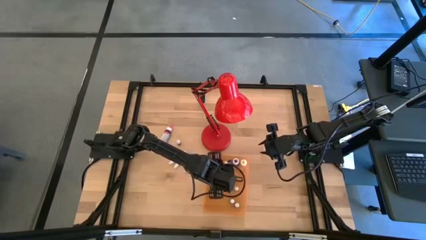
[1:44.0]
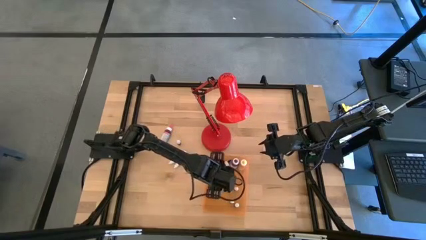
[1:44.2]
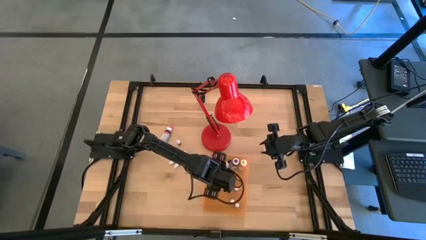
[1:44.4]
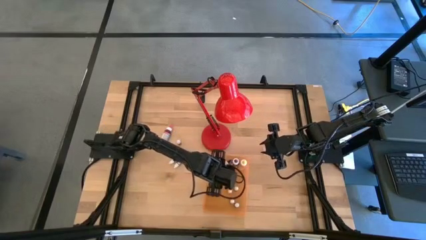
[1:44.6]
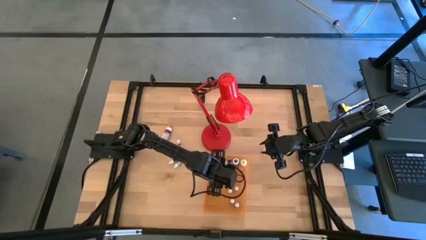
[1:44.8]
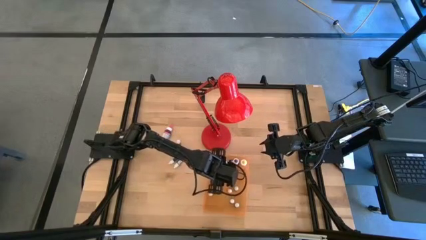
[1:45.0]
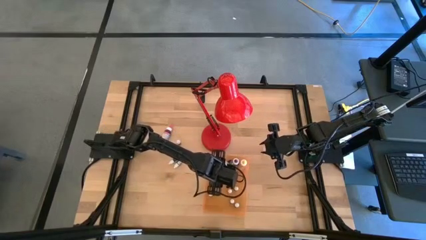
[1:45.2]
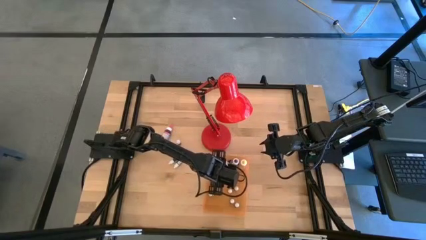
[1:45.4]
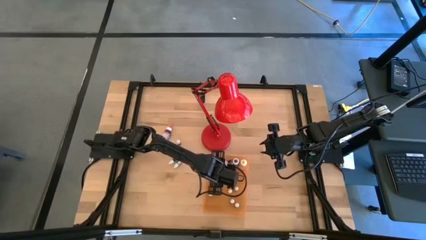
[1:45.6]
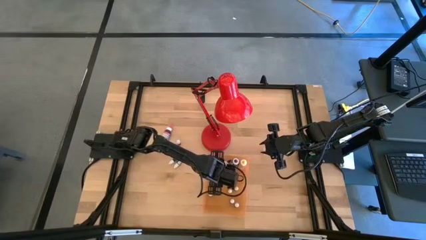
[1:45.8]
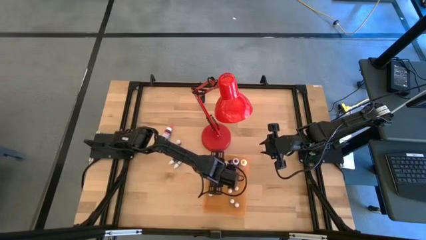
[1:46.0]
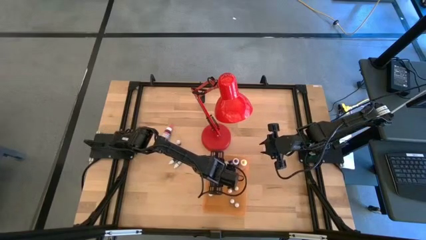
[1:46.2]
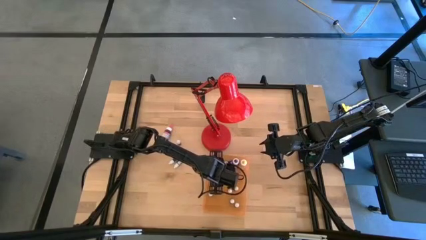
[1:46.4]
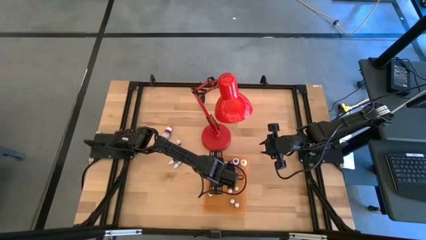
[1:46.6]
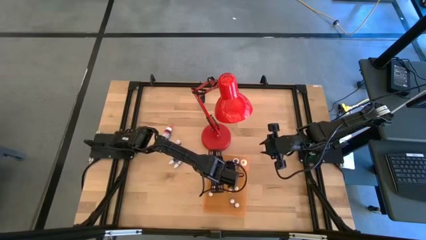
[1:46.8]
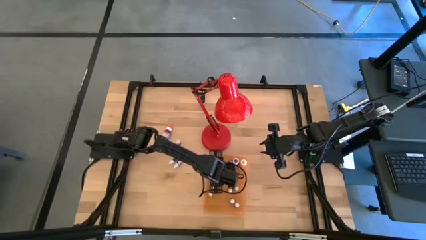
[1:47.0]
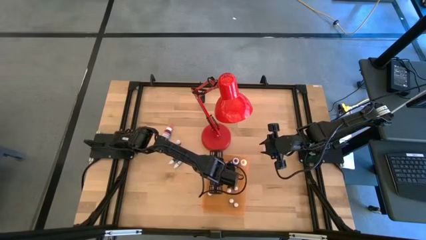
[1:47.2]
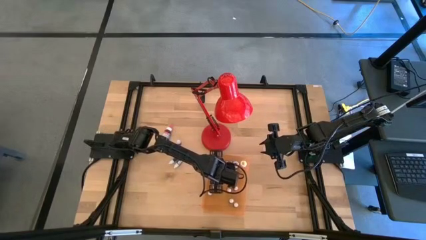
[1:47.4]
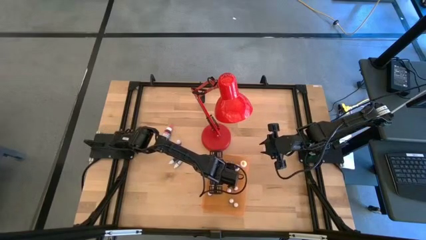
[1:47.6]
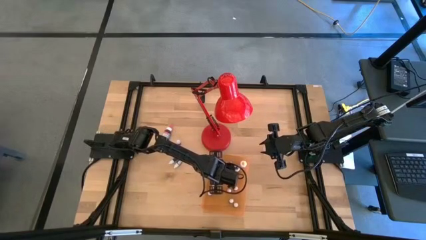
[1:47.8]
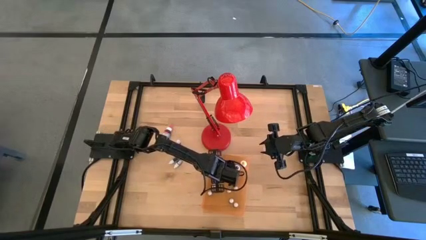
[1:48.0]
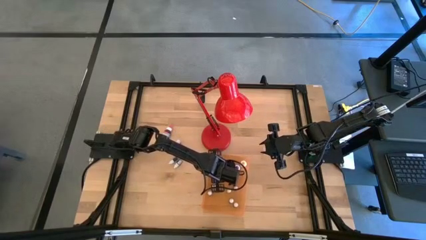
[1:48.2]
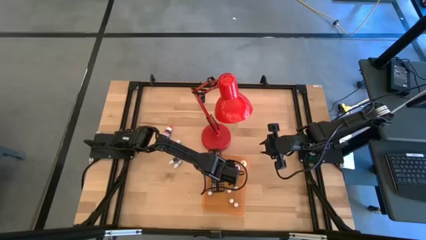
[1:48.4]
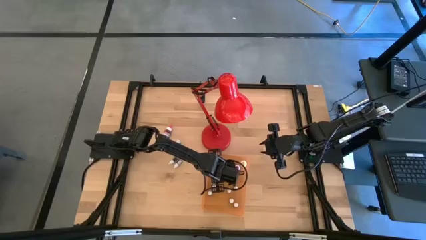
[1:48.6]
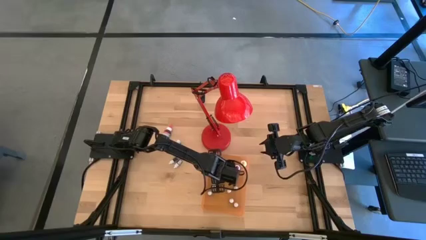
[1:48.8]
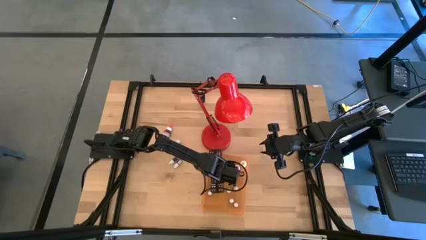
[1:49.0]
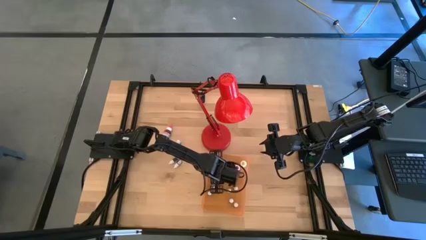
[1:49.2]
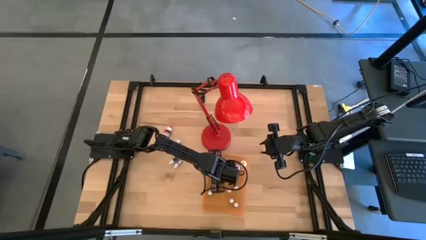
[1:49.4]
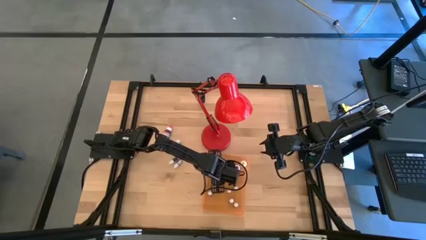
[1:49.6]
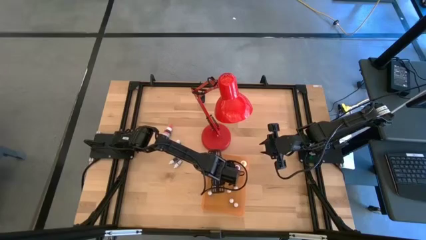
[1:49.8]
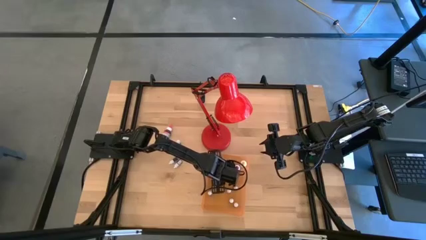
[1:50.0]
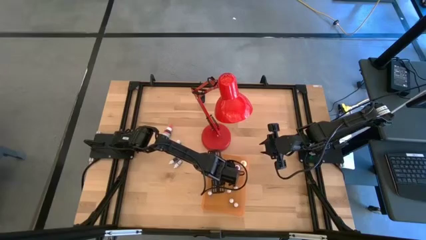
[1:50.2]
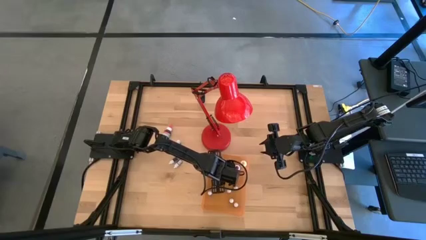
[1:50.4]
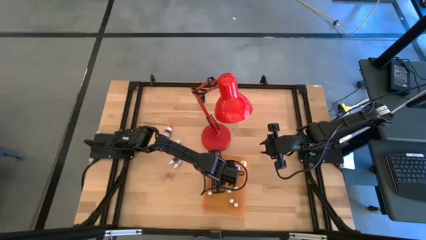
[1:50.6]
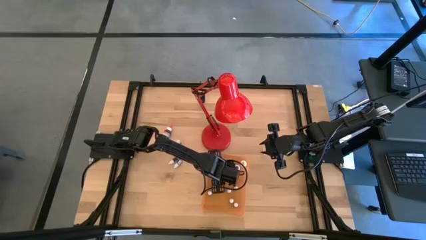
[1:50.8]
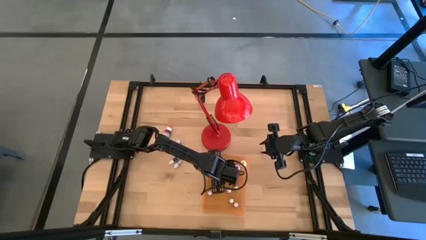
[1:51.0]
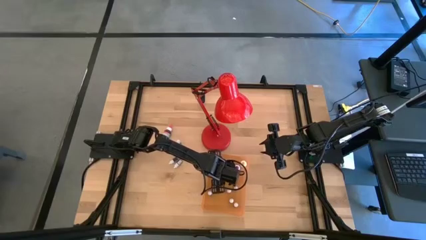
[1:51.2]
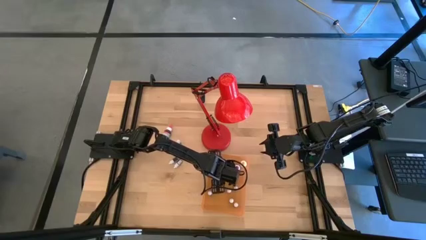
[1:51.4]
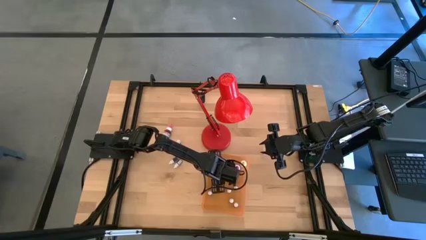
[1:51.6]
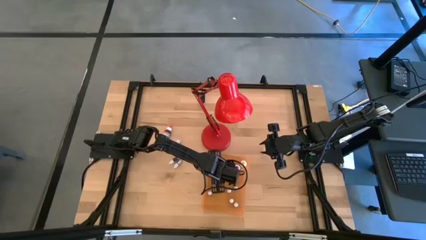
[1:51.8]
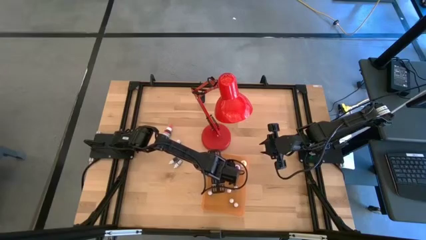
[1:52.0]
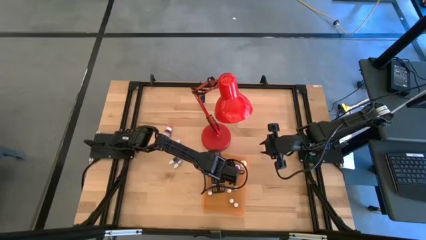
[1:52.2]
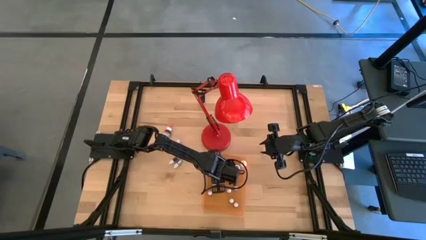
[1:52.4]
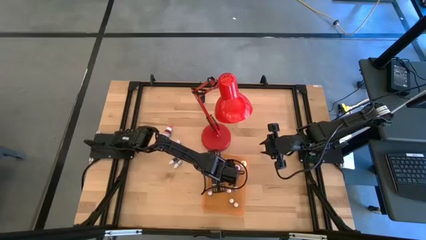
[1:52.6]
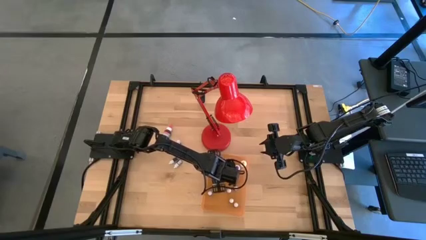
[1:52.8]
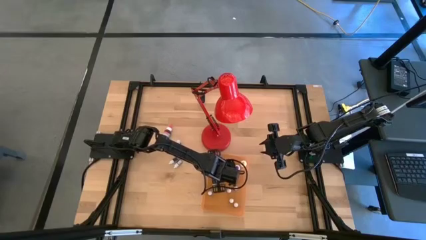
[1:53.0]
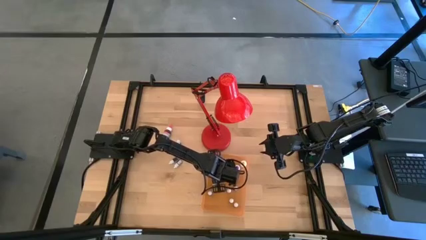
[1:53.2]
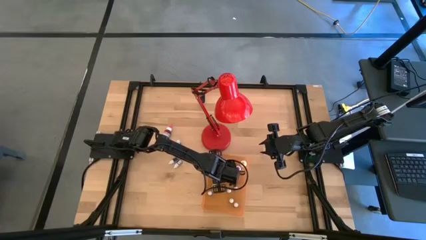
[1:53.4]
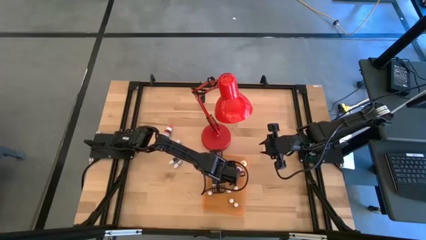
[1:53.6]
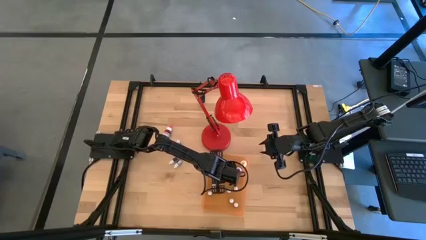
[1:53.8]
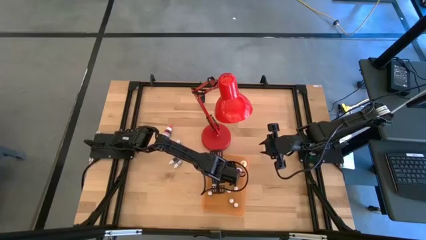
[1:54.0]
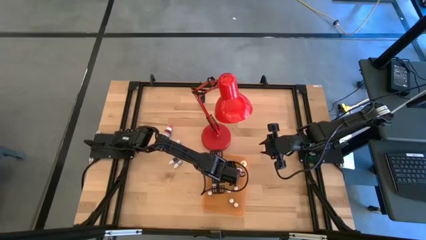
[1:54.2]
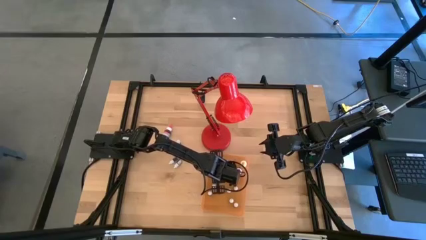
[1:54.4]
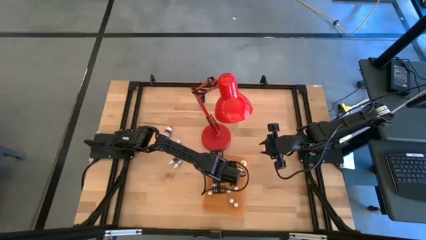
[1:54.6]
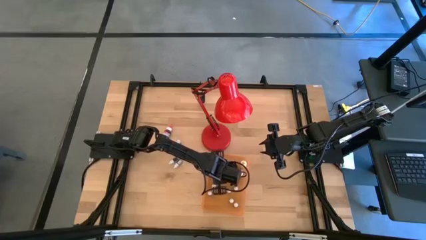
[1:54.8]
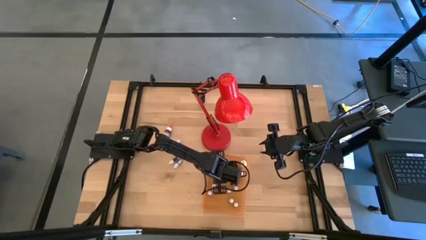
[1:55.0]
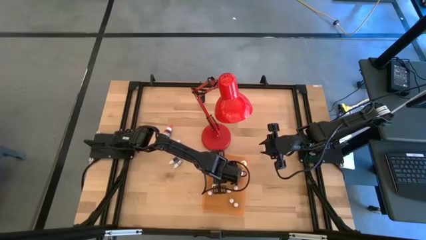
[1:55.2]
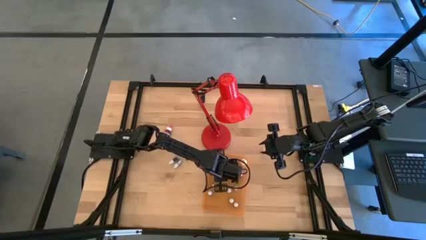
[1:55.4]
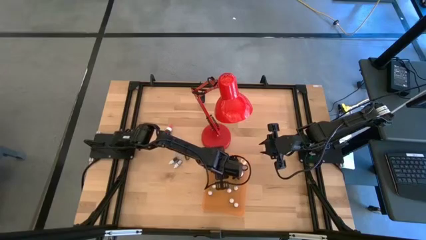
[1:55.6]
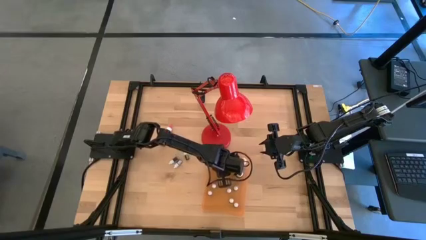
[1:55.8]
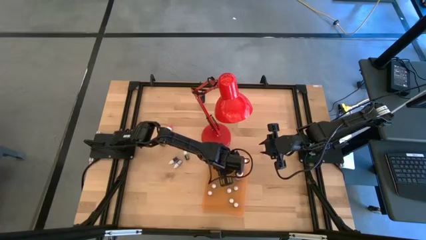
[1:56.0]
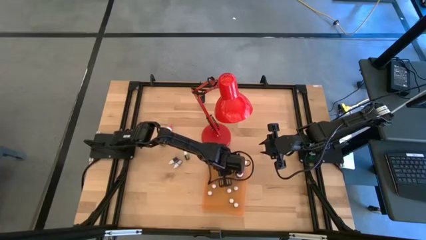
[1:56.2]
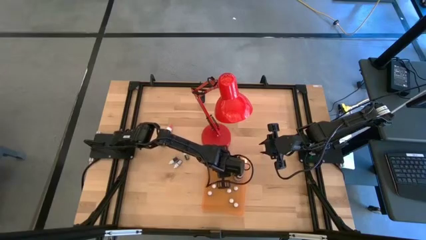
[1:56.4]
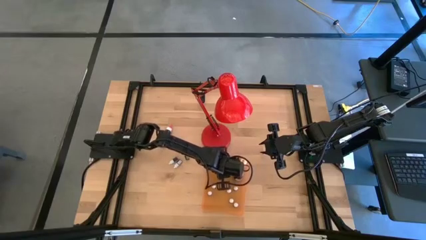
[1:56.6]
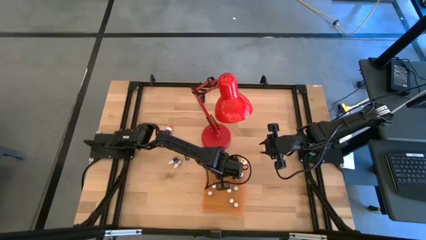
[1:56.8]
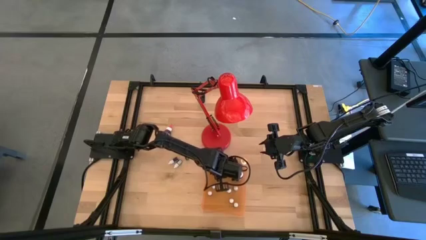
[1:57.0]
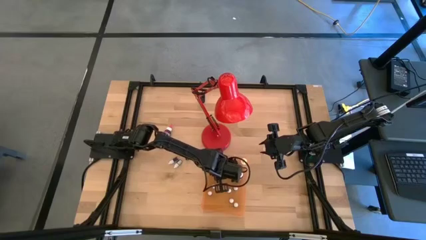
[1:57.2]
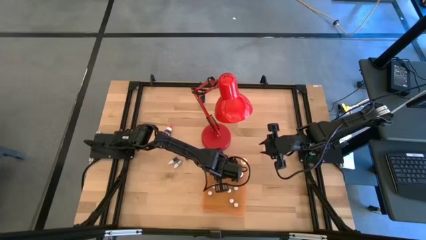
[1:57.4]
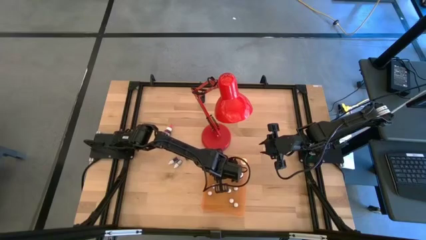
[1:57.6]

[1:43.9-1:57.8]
Task: Pick & Place food coloring
Adjust the large blue food coloring bottle in the orange bin

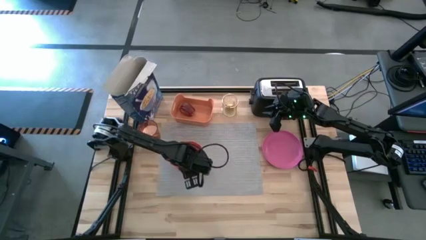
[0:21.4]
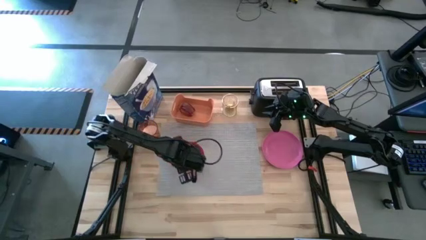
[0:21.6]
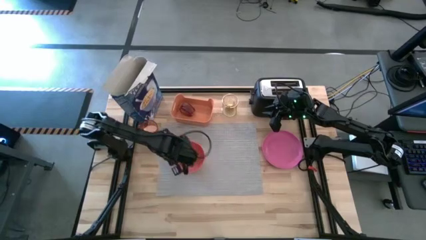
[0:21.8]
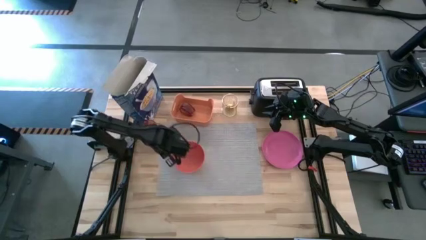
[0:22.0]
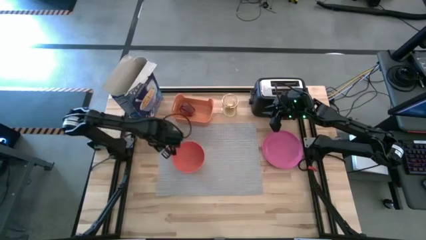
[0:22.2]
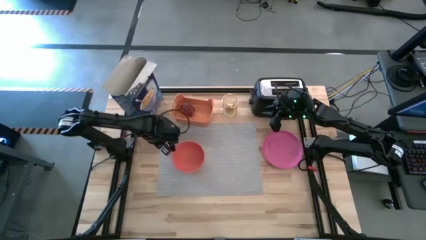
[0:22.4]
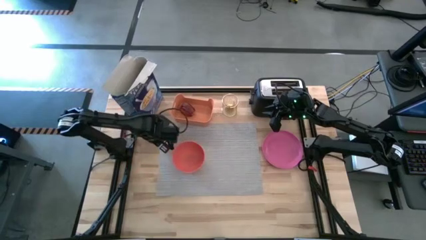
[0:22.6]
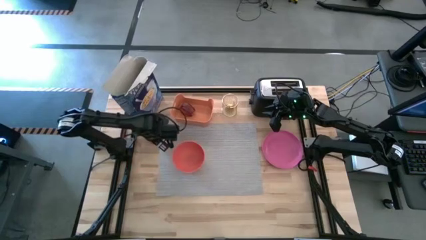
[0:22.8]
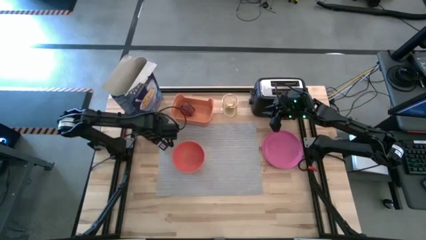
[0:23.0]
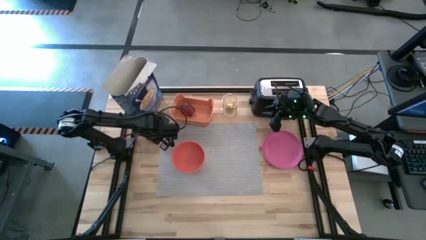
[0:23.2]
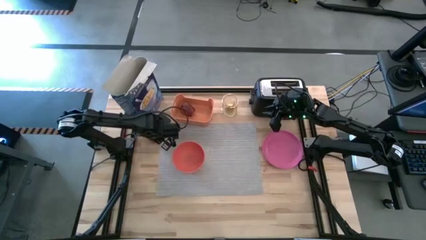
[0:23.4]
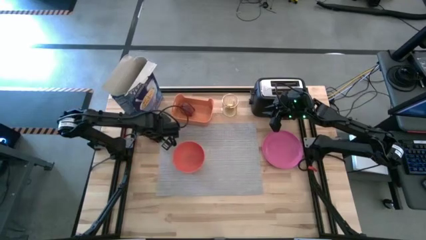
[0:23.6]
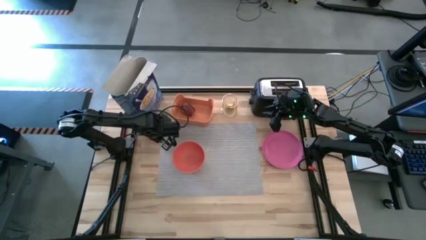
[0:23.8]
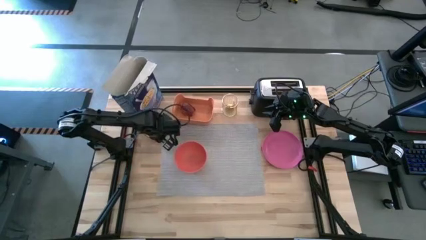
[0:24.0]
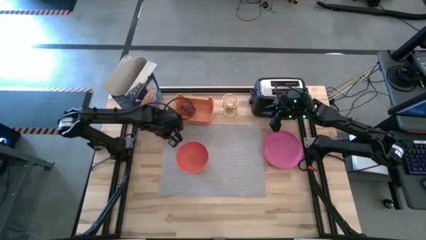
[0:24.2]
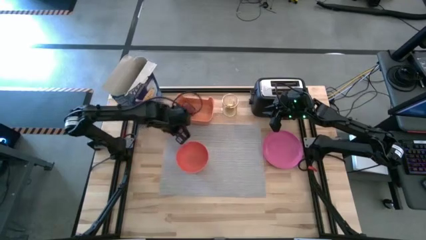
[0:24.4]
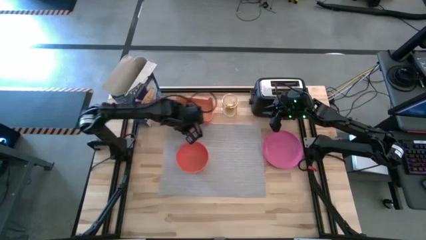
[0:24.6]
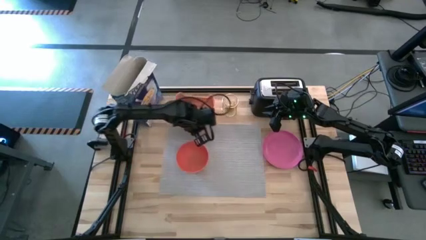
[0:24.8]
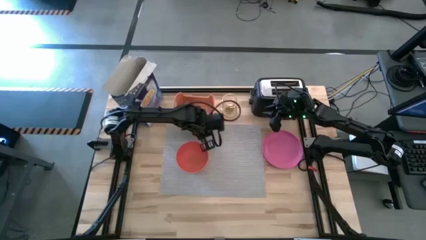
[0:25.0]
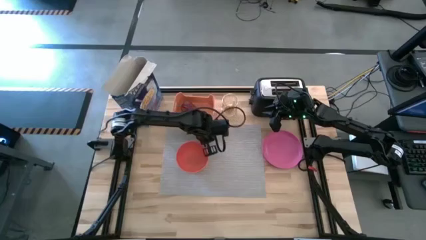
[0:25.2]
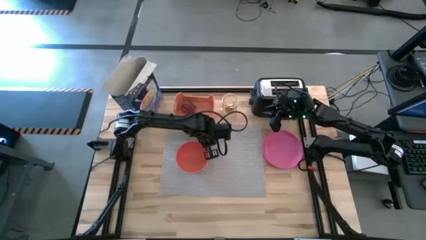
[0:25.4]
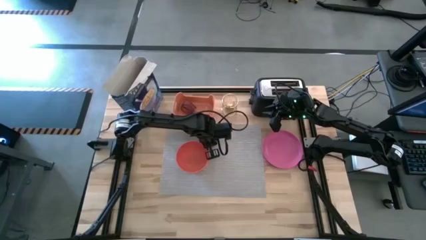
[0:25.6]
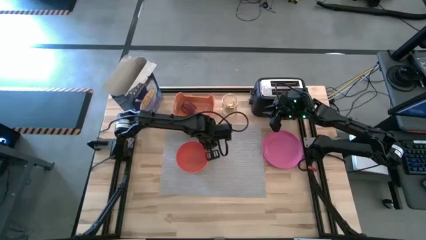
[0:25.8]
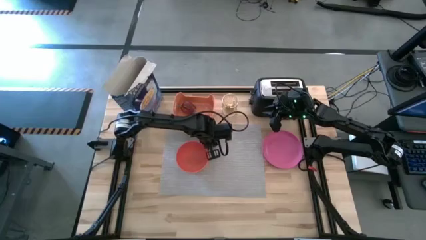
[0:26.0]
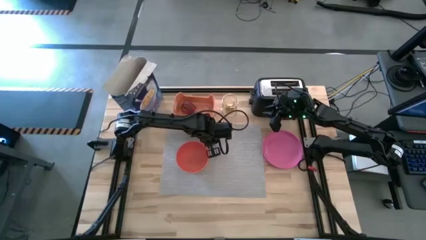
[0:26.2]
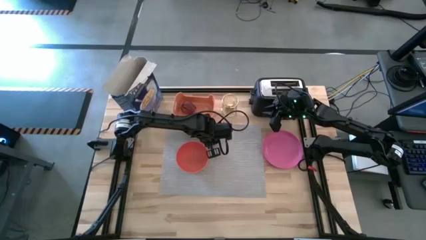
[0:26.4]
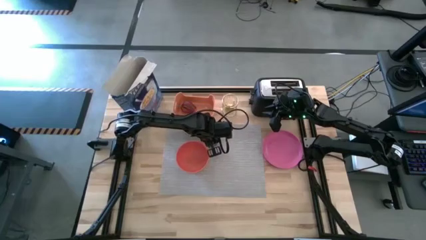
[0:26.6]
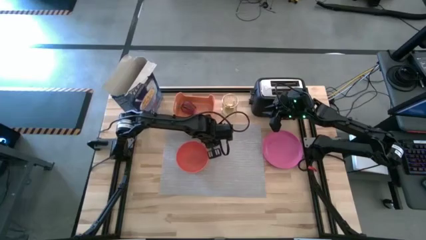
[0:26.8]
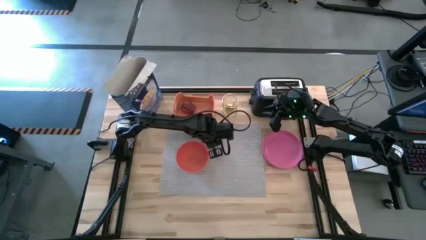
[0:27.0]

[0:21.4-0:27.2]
Task: Arrange a breakfast setting
Put the orange cup of milk on the grey tablemat to the top right of the orange bowl
